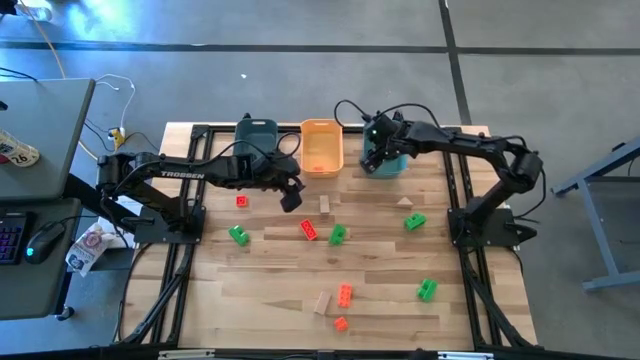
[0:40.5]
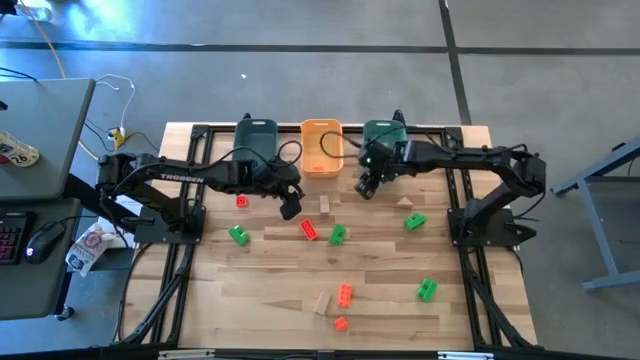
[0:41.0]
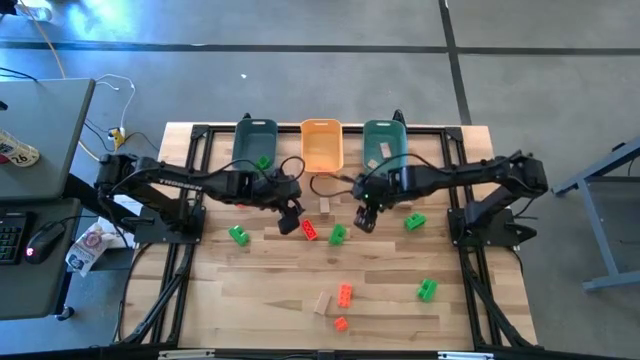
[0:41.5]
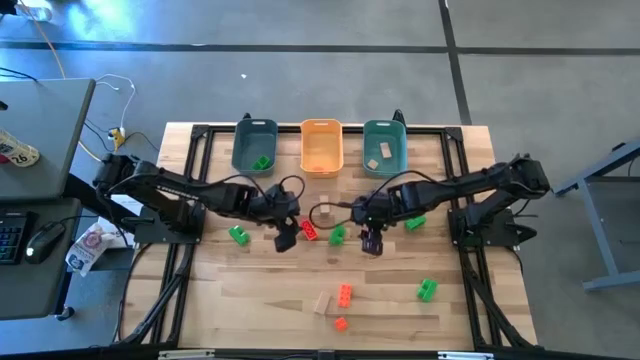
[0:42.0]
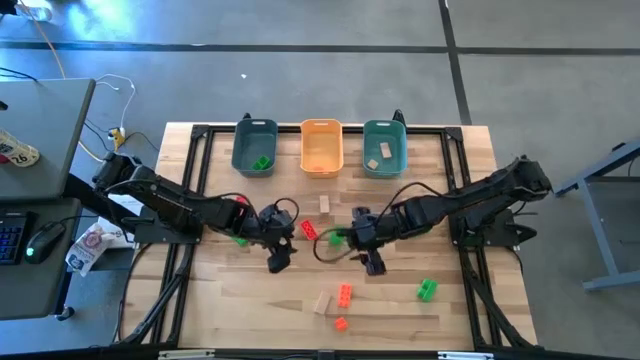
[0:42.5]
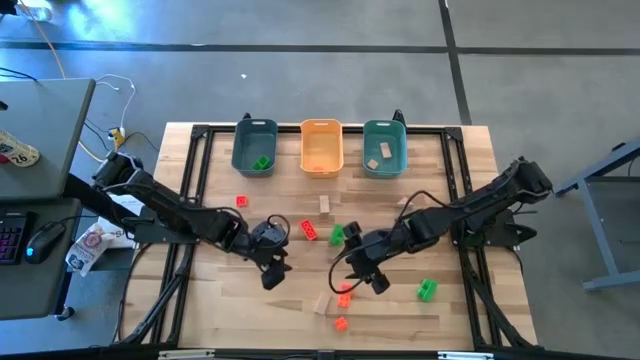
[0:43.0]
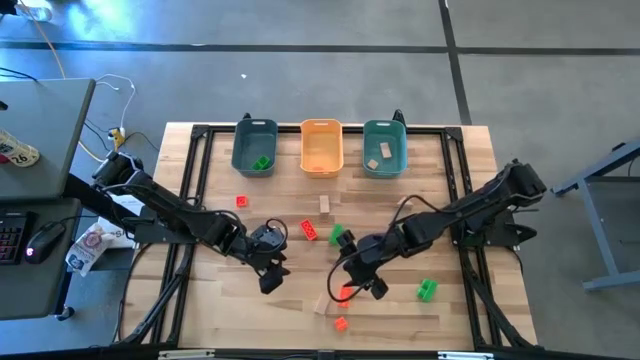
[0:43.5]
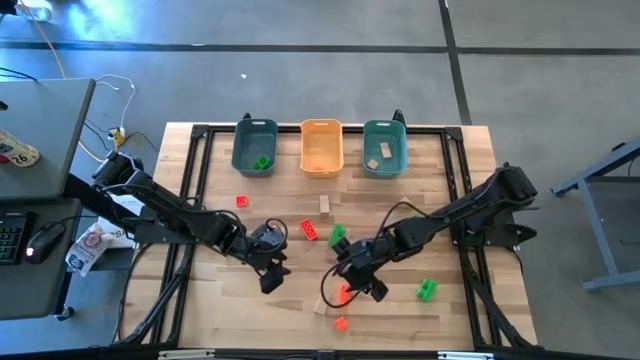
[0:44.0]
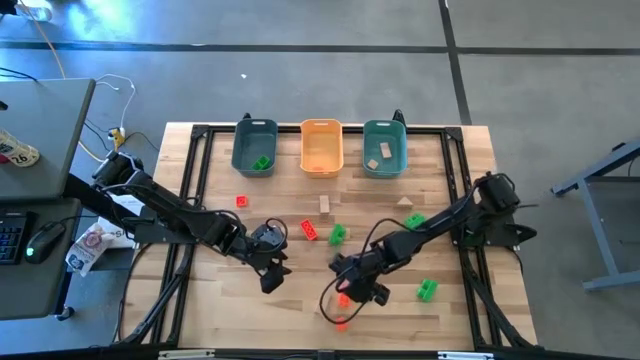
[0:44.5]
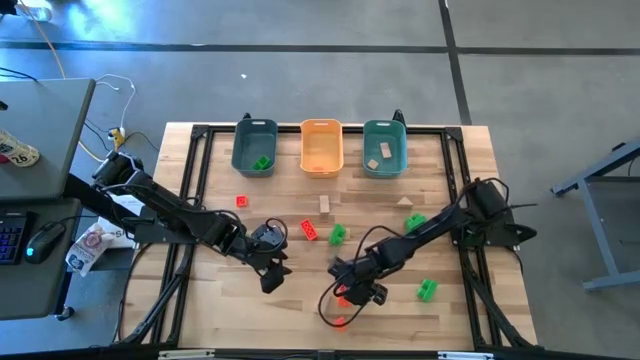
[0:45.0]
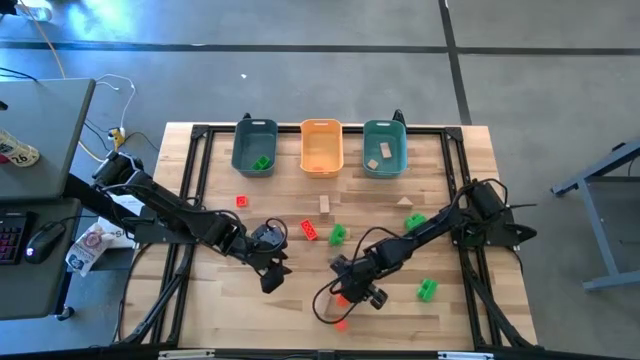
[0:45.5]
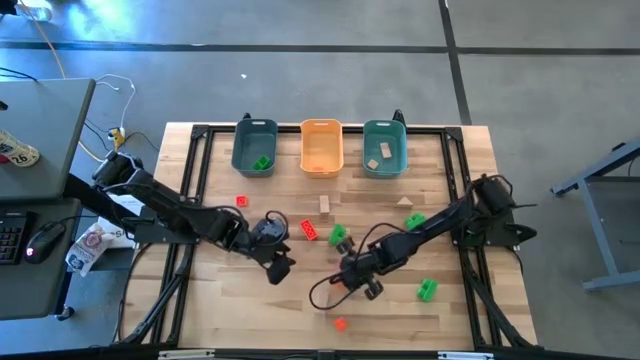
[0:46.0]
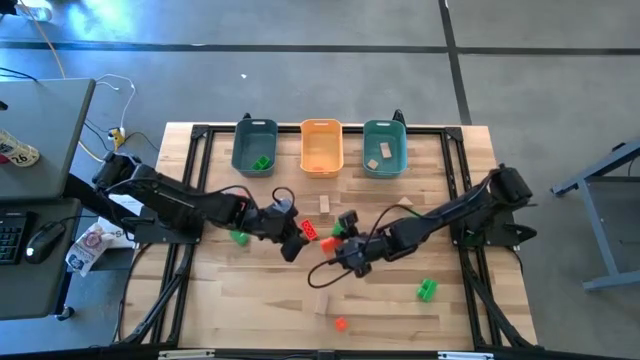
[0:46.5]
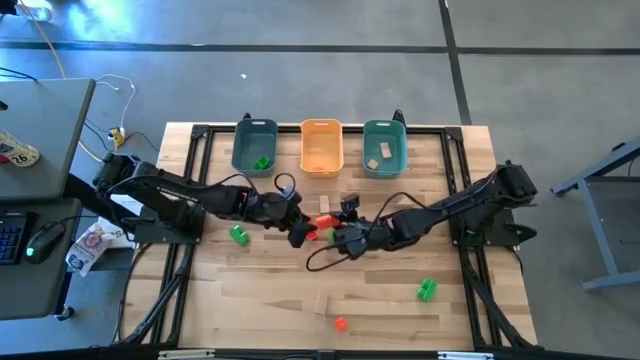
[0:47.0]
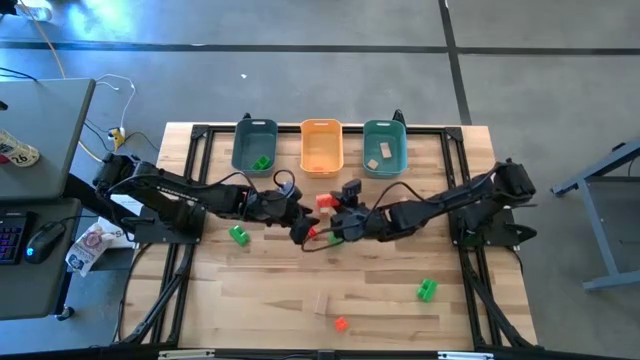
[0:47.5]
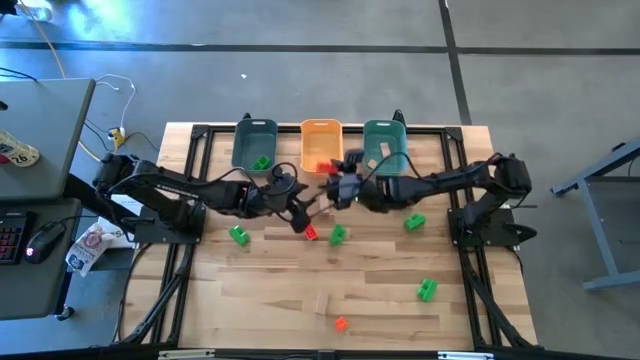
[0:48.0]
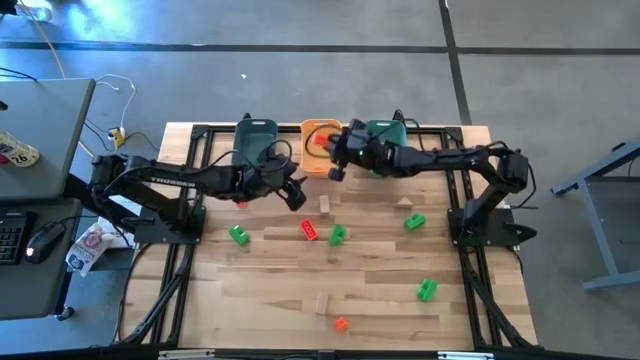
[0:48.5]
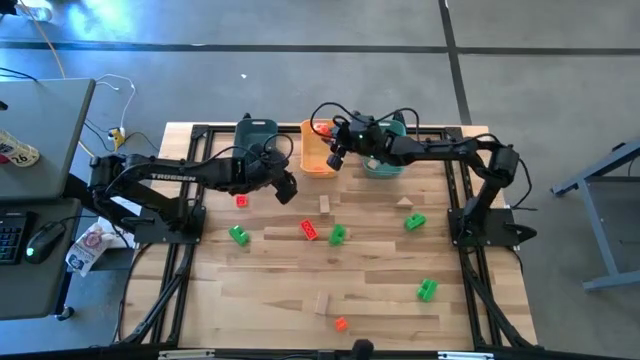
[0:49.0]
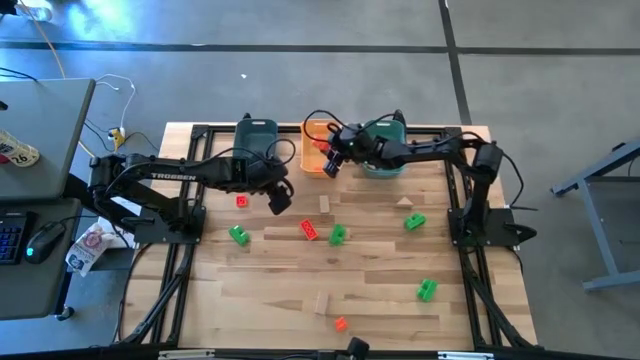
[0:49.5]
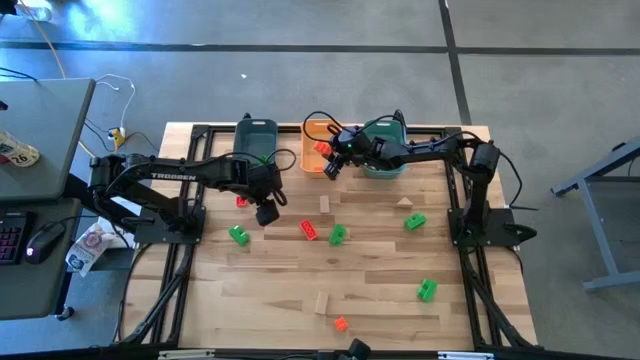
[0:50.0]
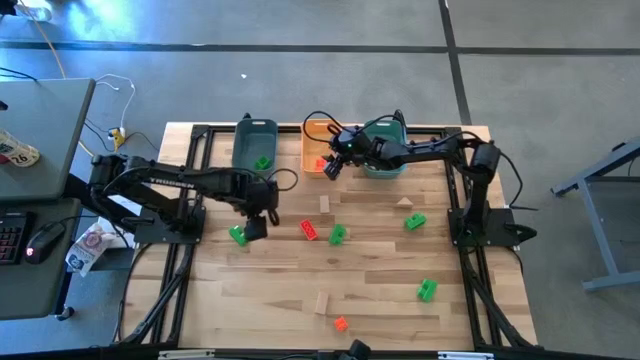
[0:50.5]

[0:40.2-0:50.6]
Task: Sort & place blocks by color
Put the orange game piece into the yellow bin

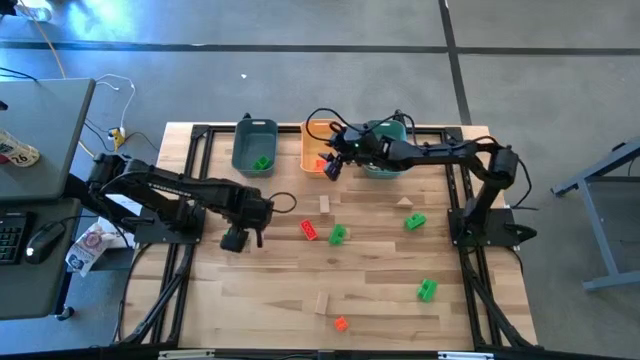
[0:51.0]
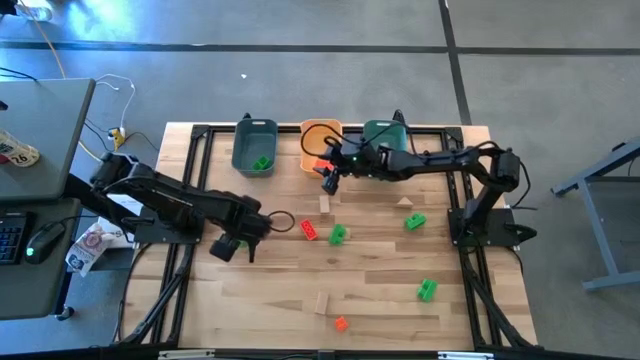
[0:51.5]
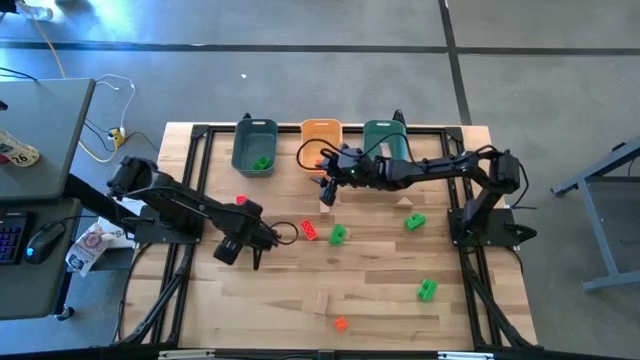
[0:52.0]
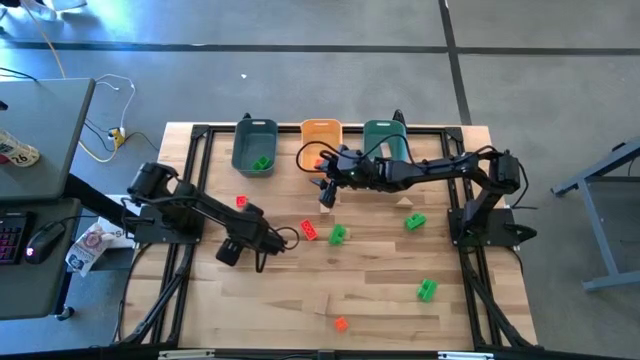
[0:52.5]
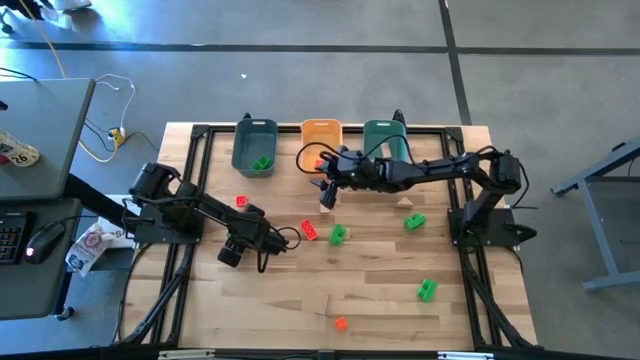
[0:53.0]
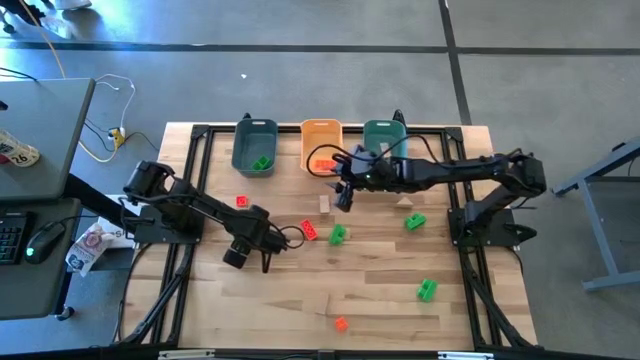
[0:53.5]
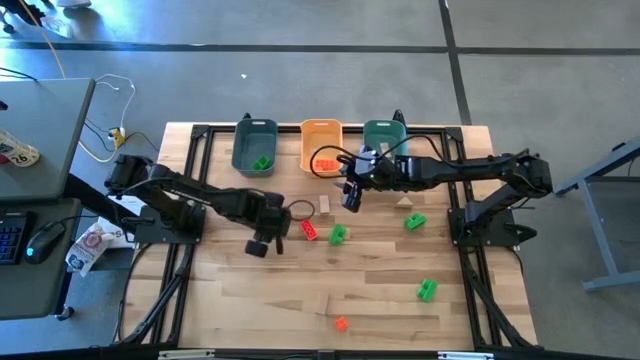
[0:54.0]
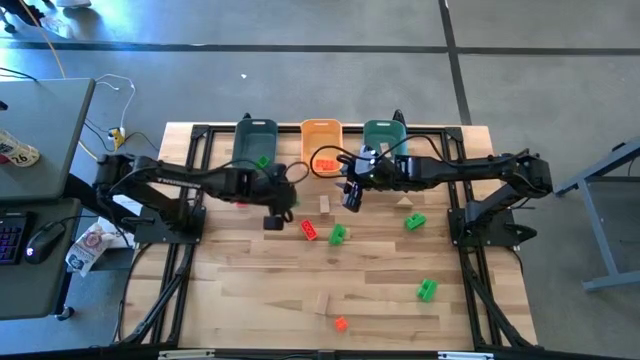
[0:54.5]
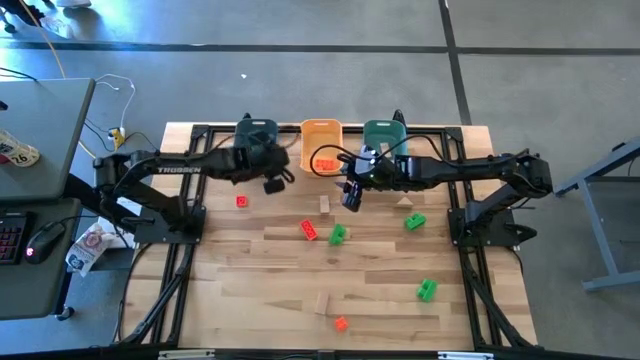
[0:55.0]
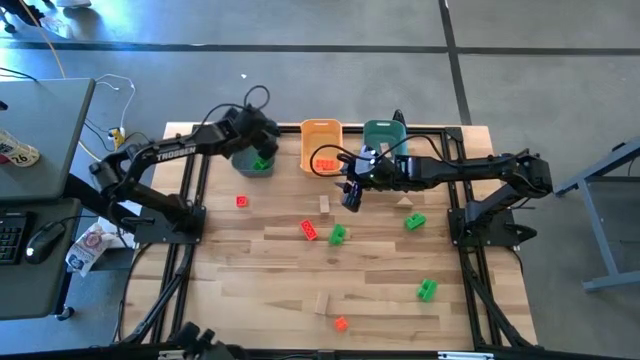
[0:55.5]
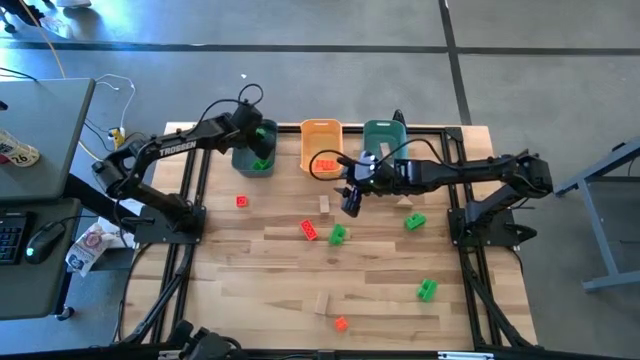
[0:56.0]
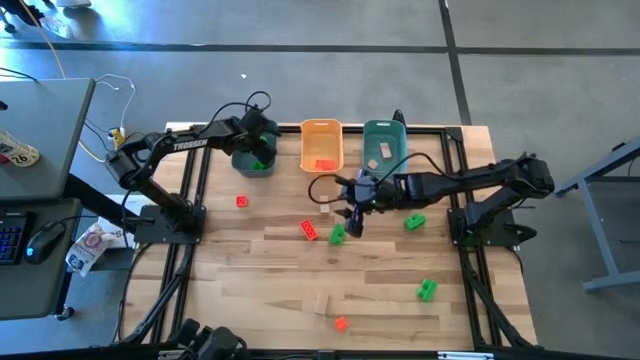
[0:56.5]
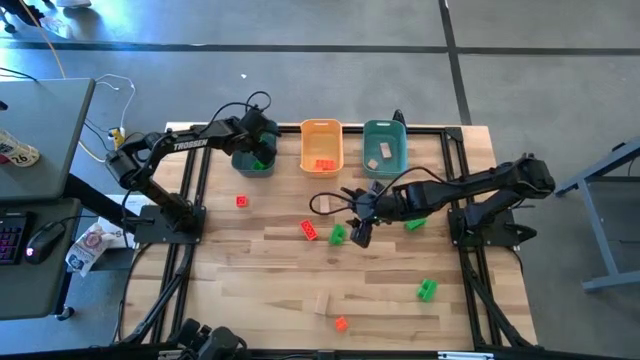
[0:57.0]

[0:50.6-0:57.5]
Put the green game piece into the dark blue bin

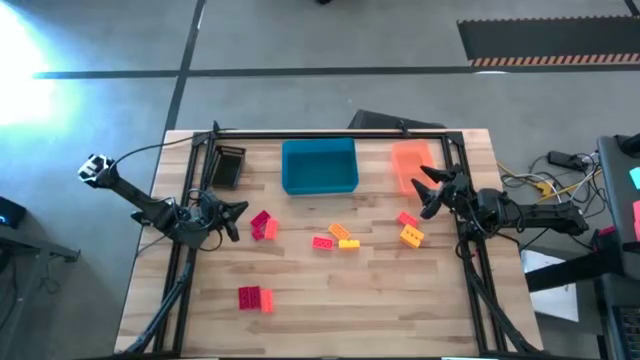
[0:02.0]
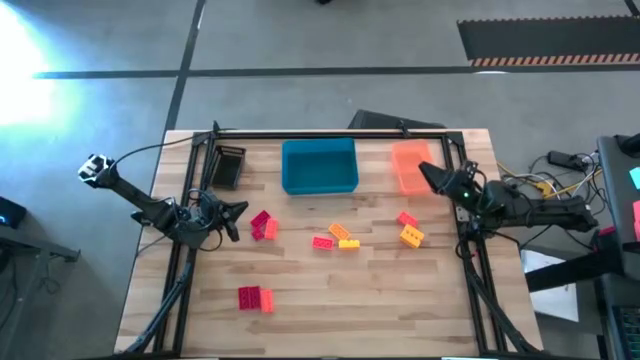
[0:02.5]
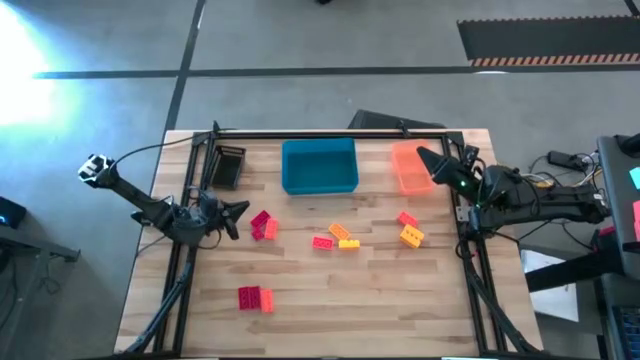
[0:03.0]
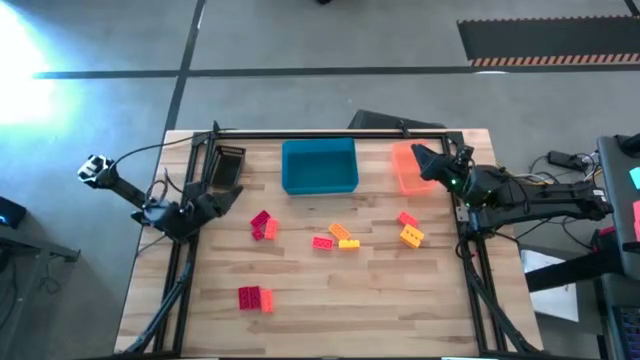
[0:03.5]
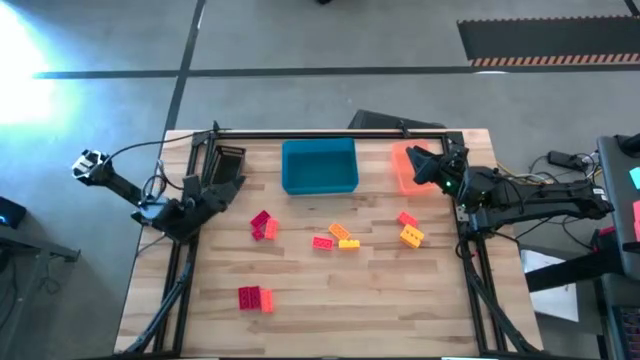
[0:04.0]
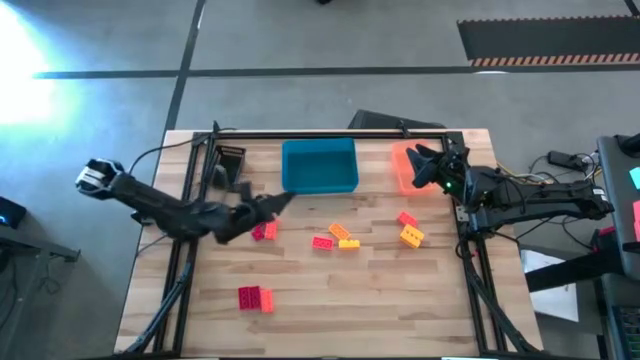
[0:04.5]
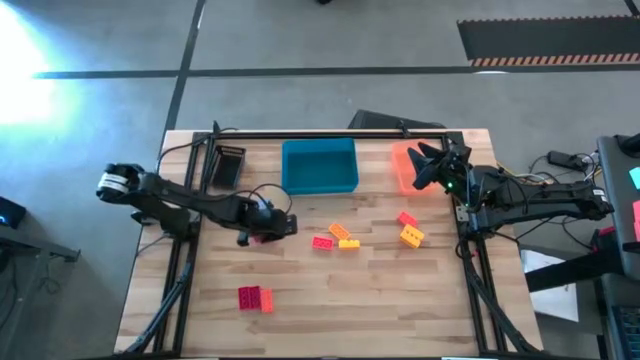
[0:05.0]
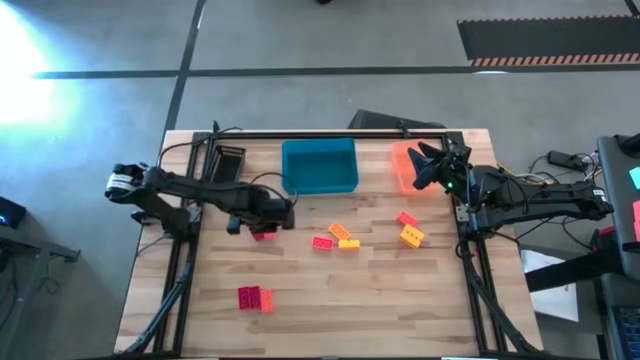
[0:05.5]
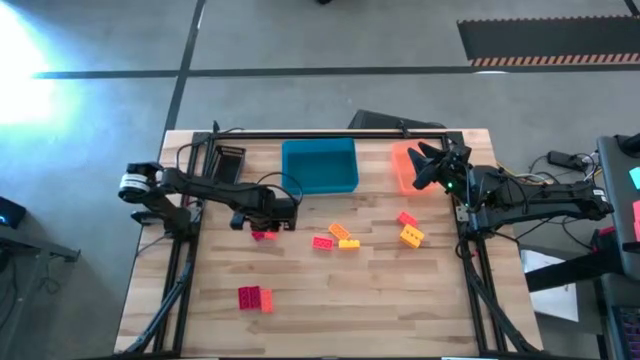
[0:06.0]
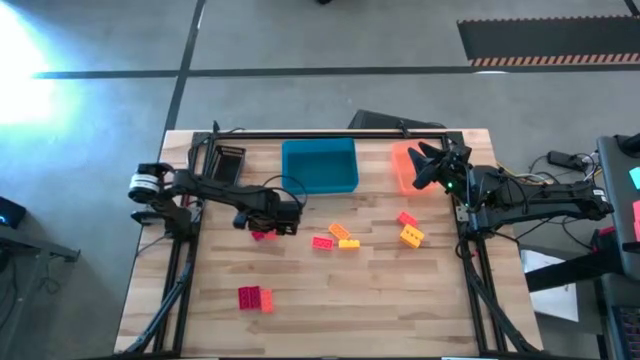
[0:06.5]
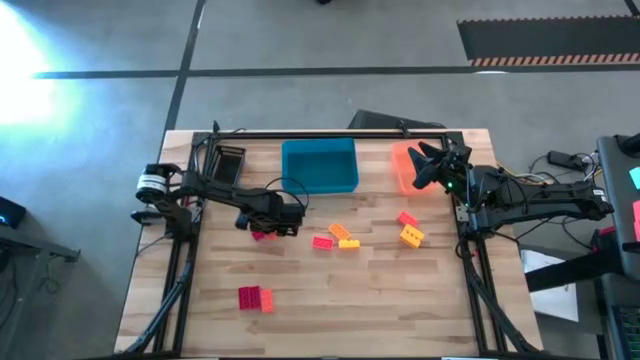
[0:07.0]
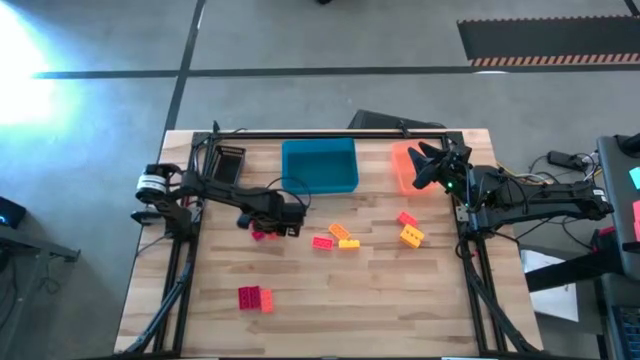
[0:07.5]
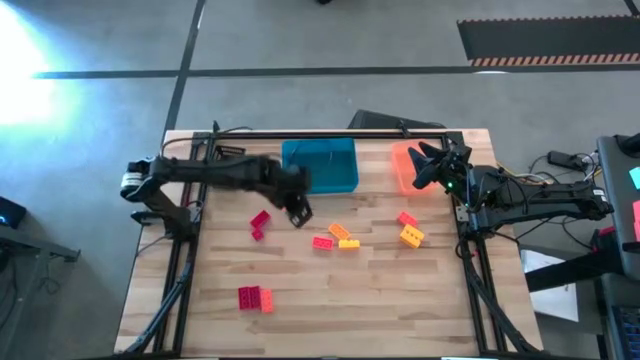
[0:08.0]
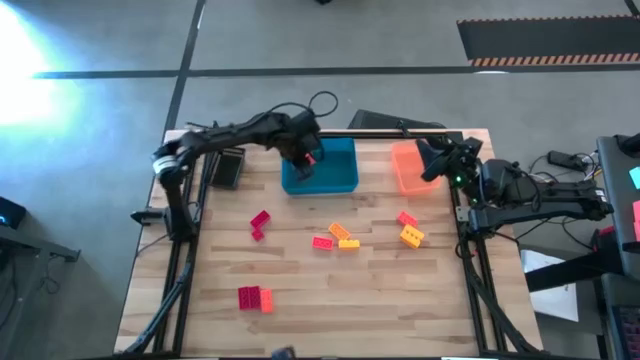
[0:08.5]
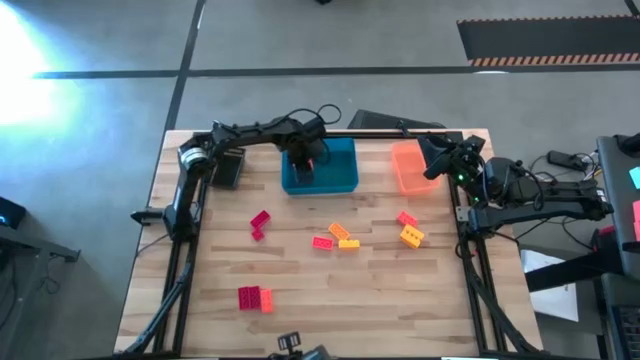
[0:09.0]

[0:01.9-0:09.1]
Task: Sort & place blocks by color
Put the orange game piece into the black bin
